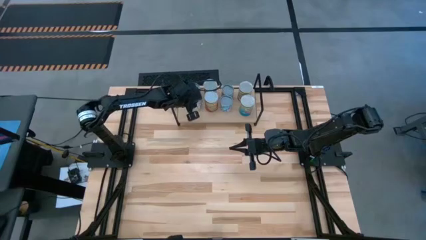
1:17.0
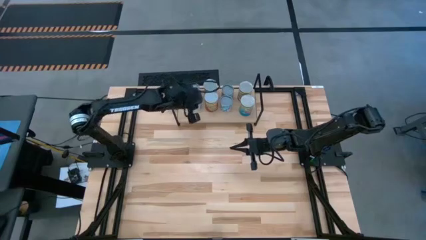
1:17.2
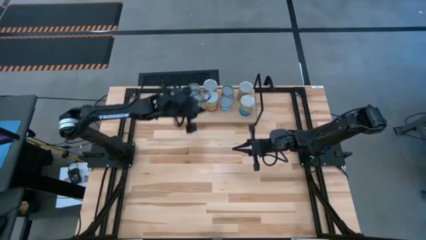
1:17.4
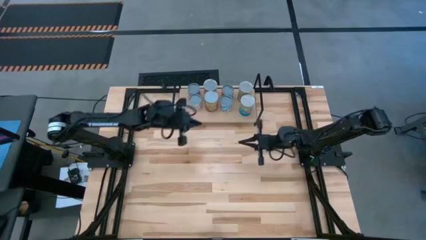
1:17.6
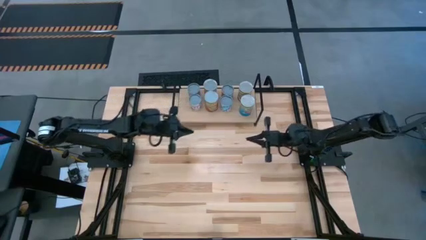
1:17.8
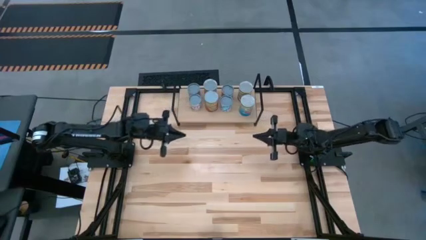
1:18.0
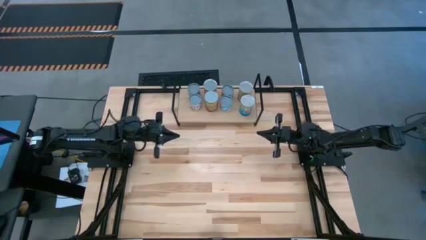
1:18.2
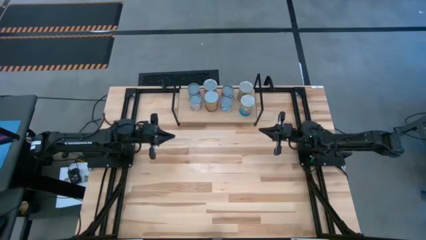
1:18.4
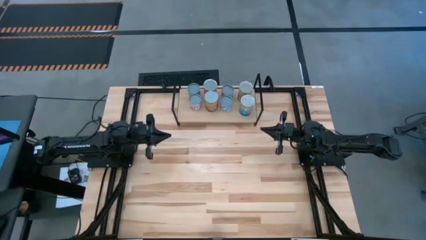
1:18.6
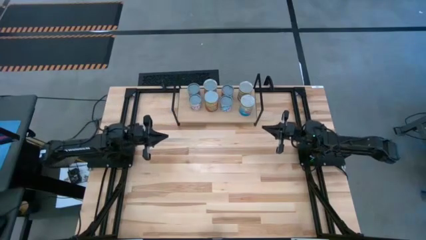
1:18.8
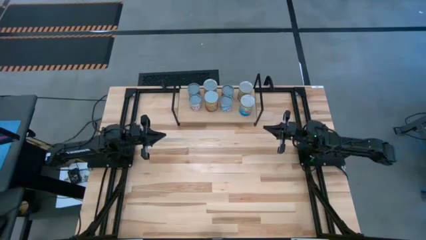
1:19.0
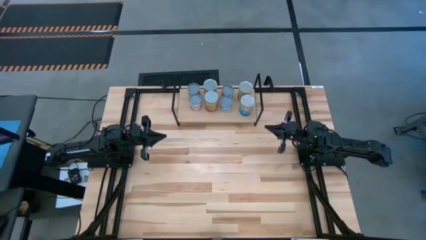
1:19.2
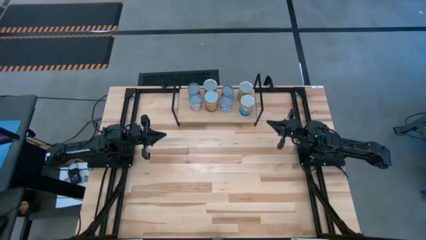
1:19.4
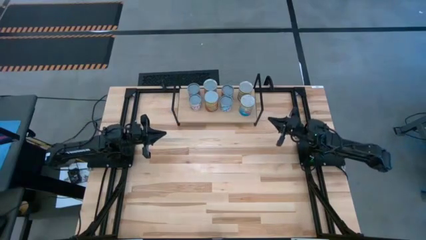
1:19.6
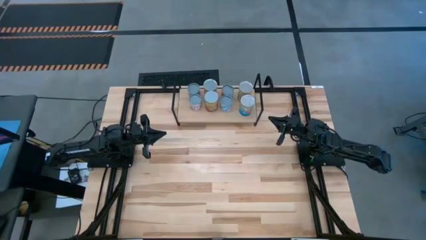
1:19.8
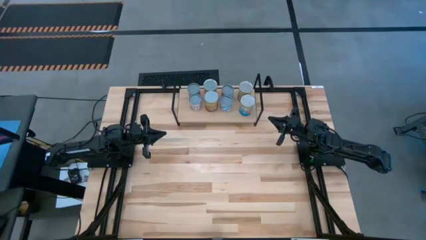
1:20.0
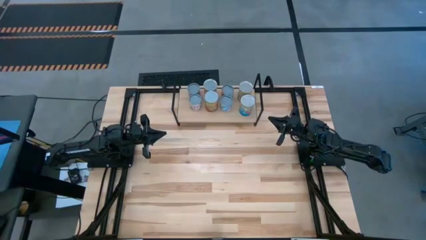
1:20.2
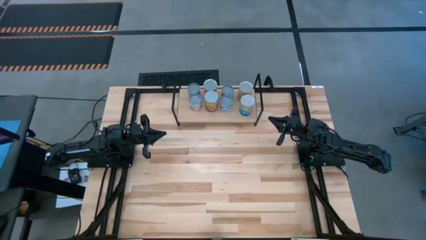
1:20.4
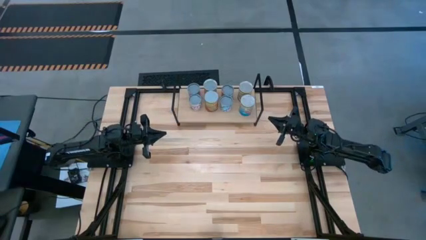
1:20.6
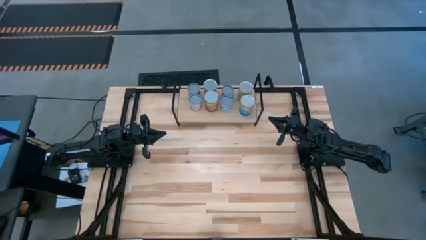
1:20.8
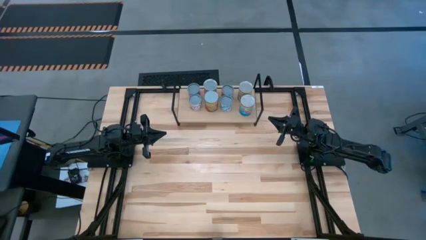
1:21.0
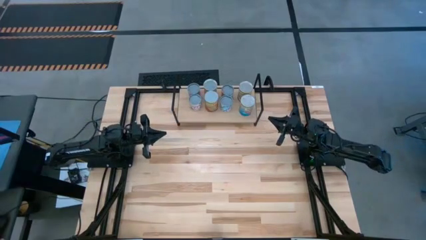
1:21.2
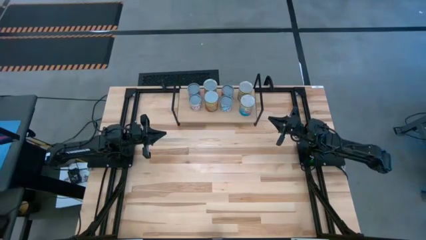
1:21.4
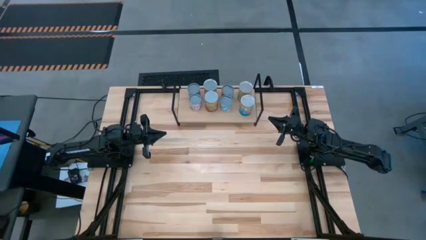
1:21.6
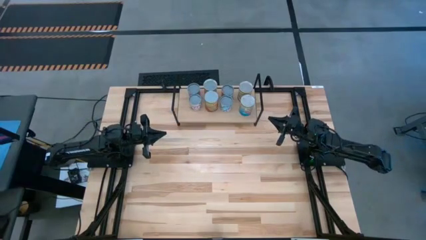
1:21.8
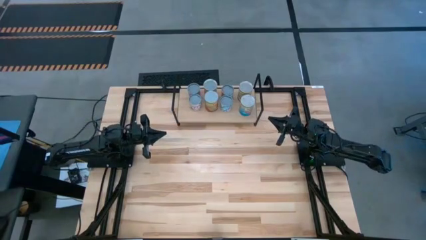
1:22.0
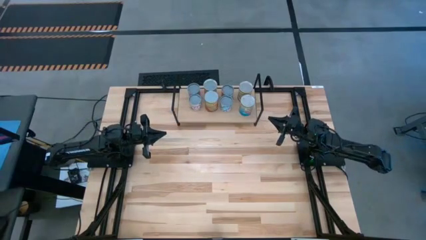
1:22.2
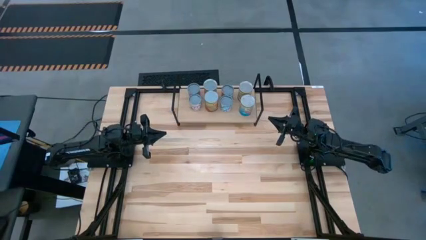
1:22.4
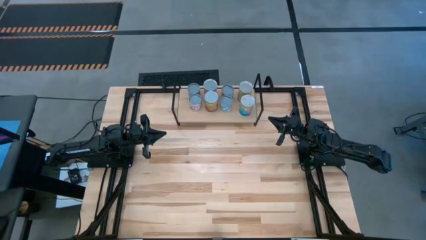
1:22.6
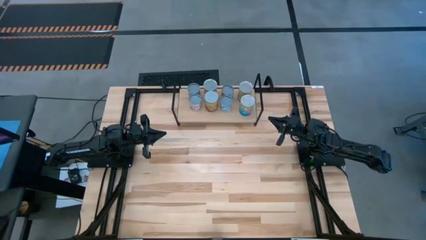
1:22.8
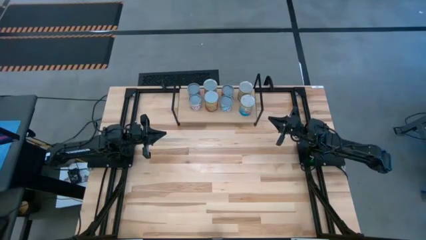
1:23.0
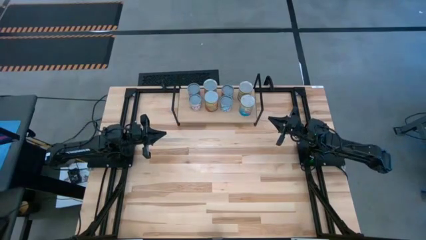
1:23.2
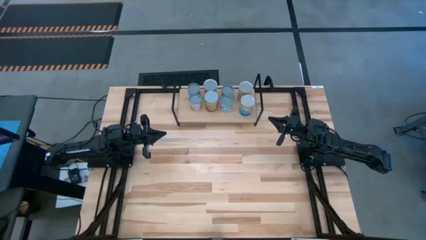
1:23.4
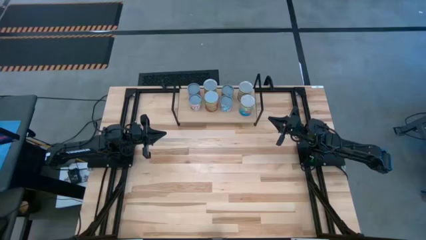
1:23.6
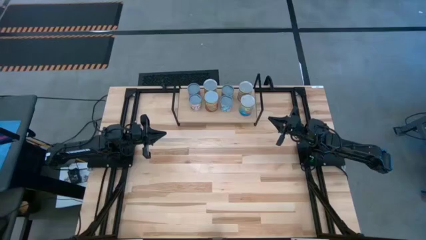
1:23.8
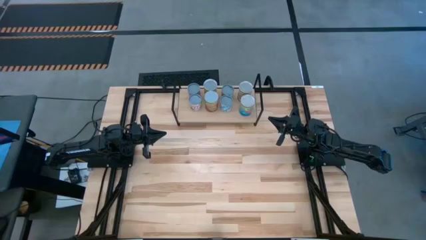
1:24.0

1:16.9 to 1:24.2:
Task: Pick and place cans onto a shelf
Return to Home Position

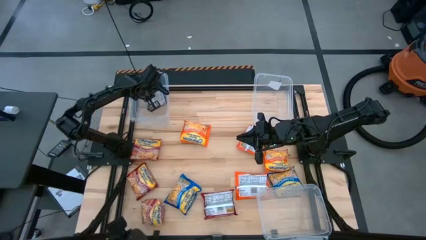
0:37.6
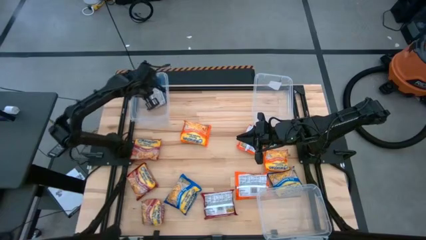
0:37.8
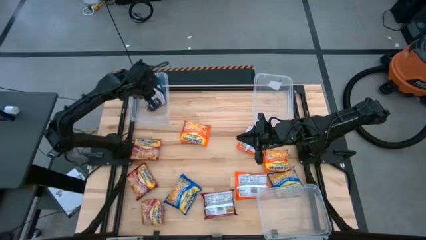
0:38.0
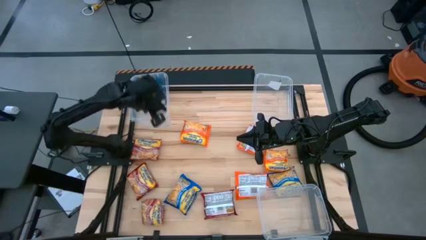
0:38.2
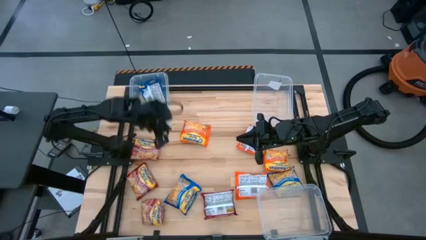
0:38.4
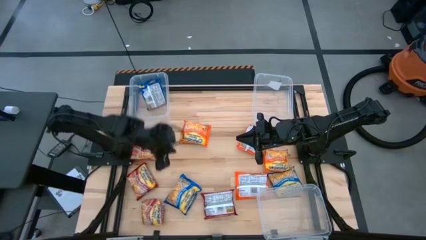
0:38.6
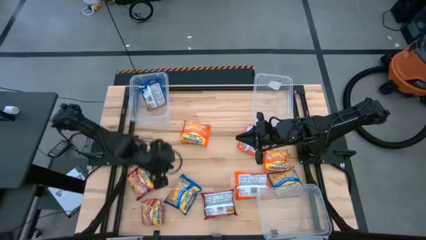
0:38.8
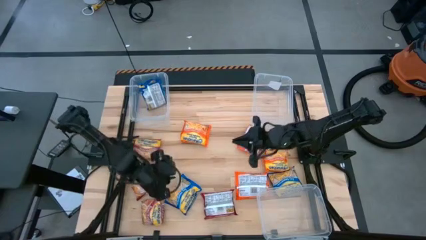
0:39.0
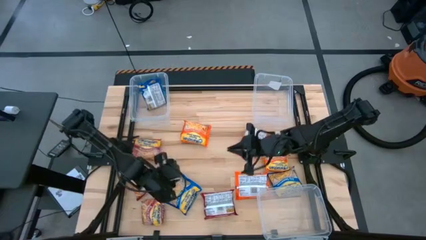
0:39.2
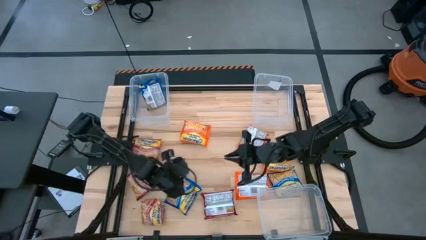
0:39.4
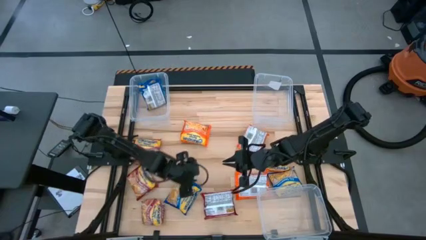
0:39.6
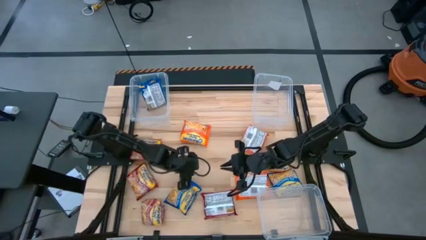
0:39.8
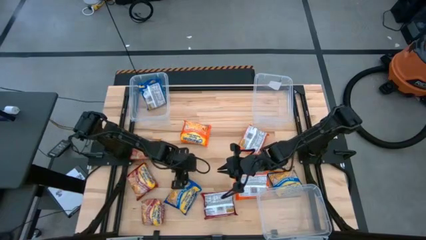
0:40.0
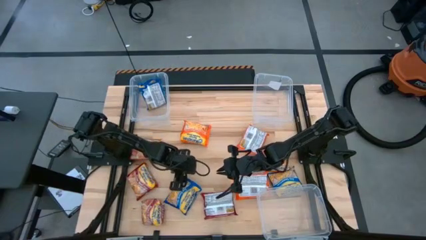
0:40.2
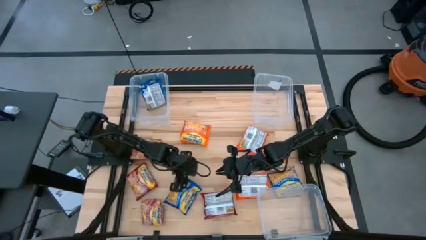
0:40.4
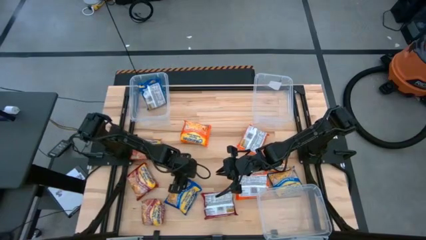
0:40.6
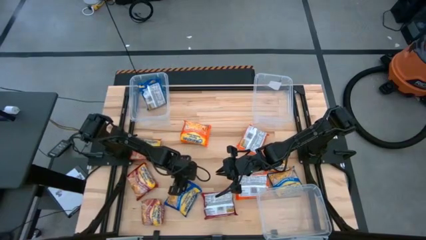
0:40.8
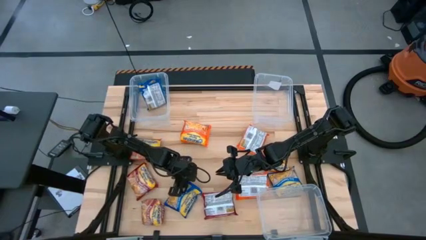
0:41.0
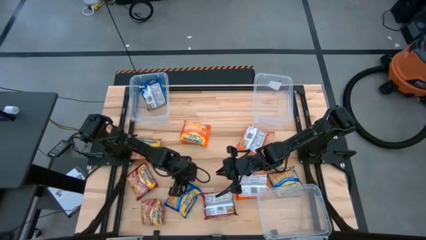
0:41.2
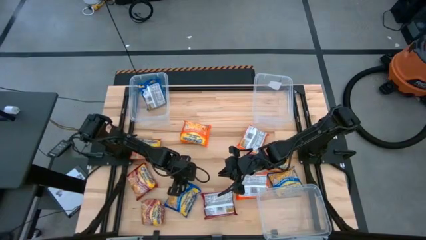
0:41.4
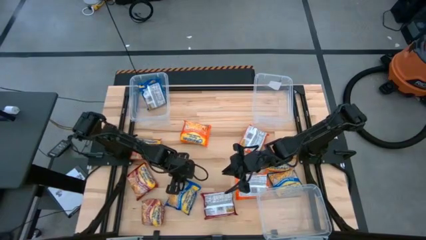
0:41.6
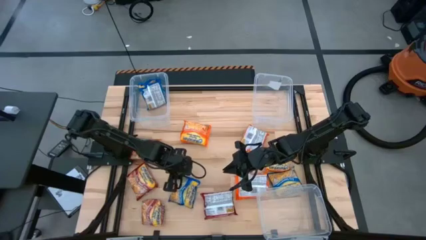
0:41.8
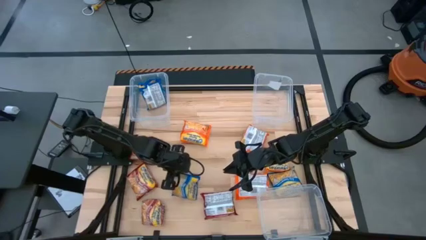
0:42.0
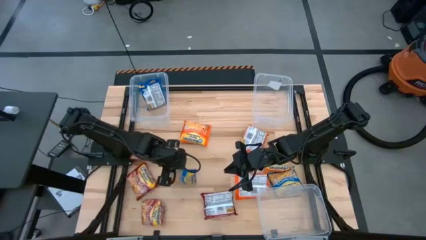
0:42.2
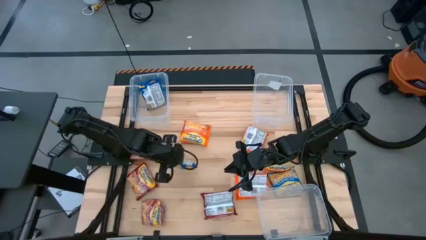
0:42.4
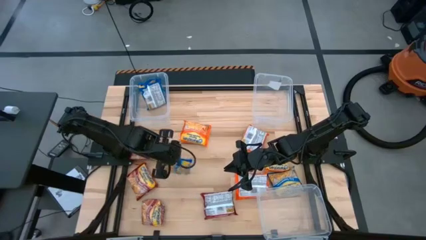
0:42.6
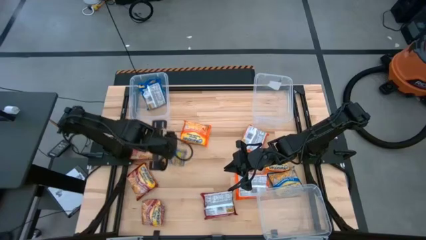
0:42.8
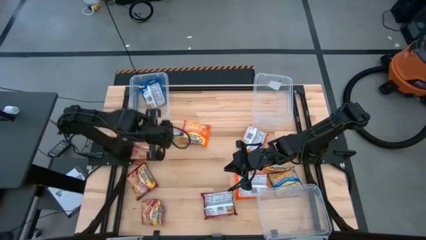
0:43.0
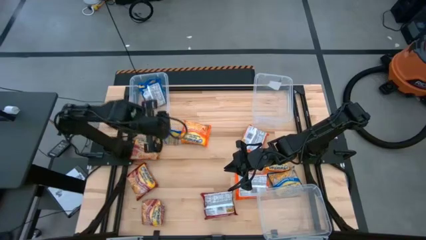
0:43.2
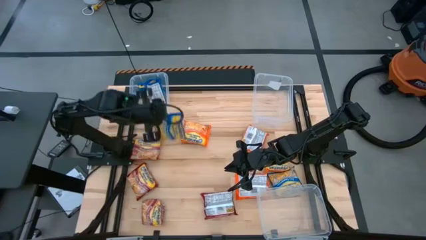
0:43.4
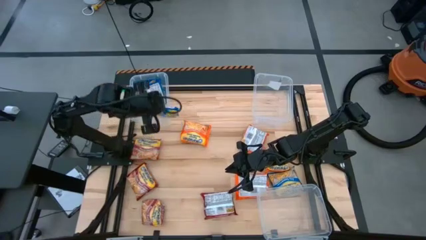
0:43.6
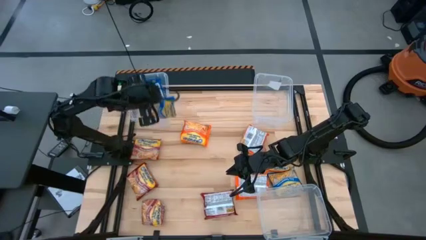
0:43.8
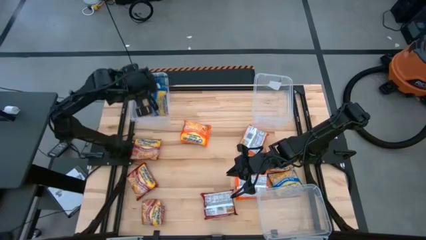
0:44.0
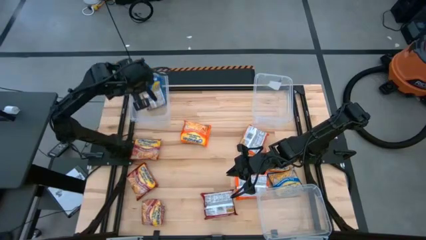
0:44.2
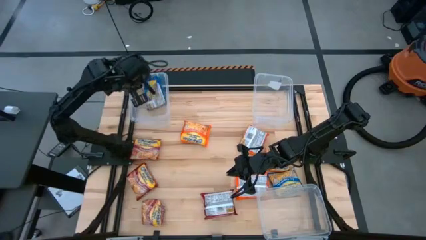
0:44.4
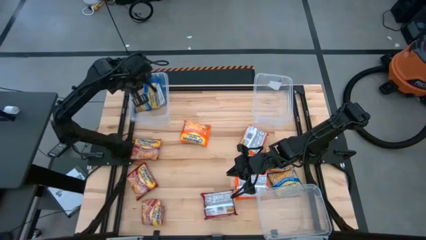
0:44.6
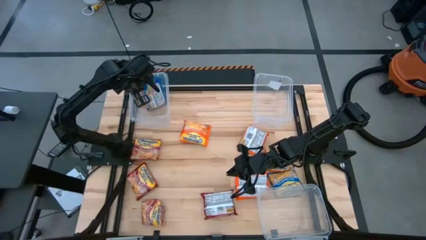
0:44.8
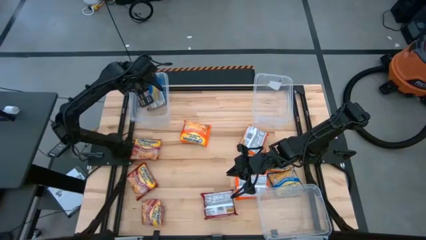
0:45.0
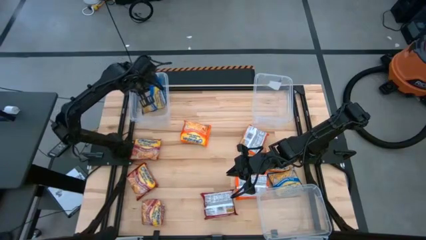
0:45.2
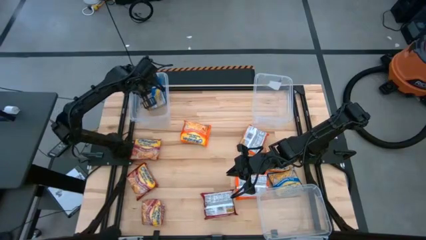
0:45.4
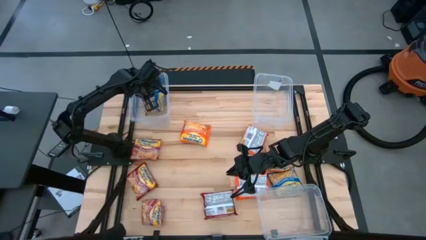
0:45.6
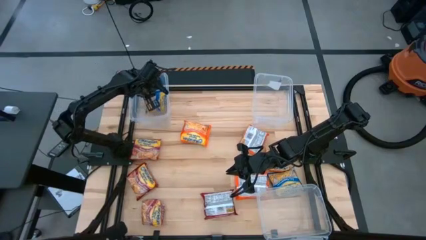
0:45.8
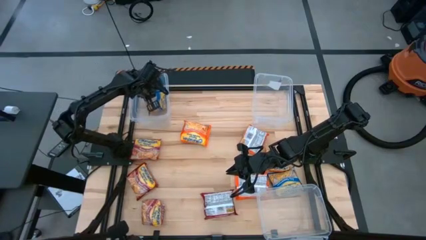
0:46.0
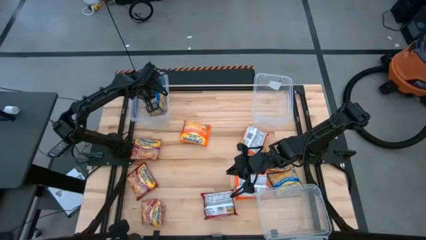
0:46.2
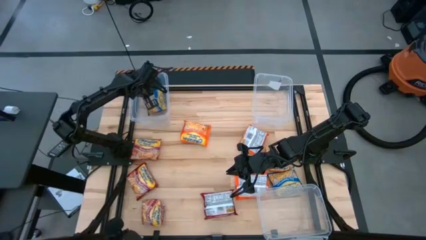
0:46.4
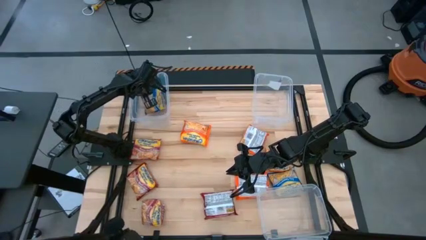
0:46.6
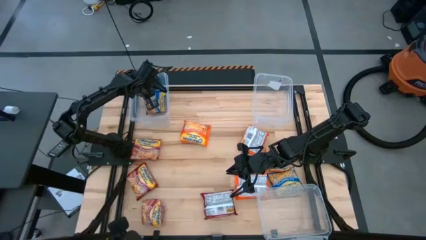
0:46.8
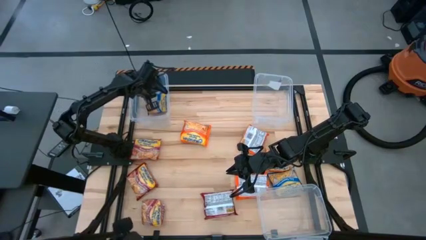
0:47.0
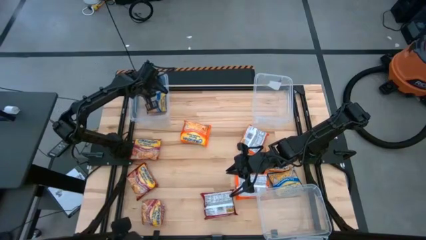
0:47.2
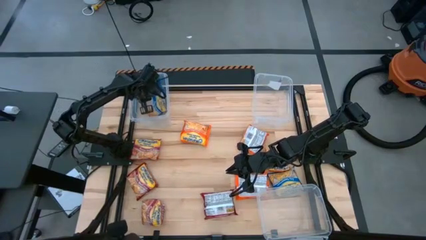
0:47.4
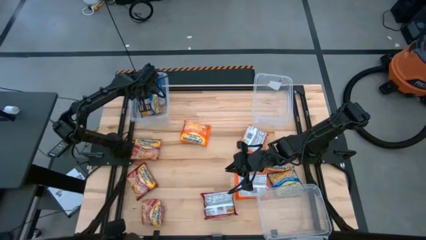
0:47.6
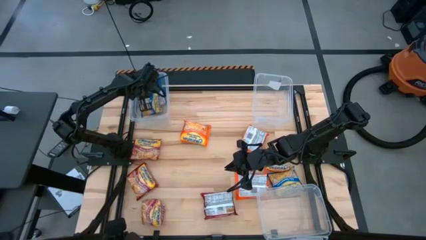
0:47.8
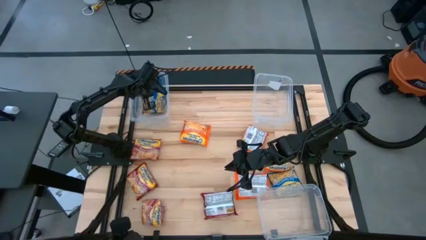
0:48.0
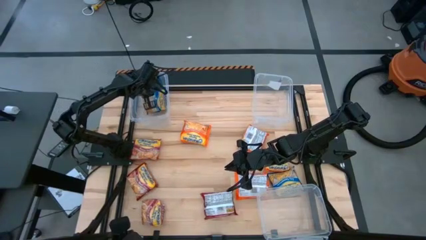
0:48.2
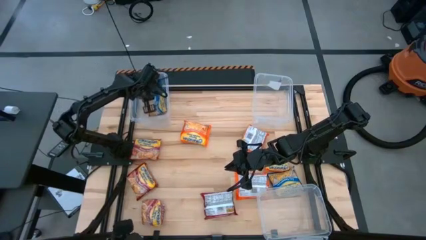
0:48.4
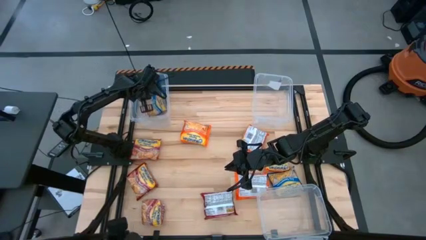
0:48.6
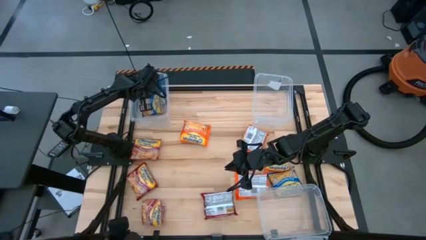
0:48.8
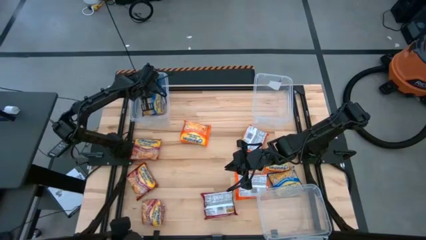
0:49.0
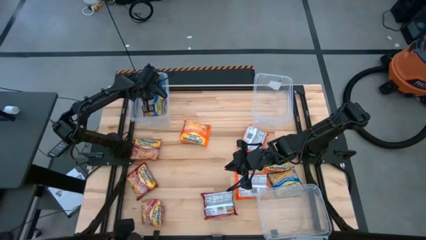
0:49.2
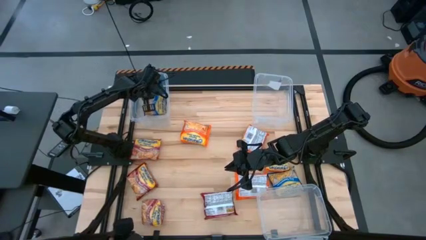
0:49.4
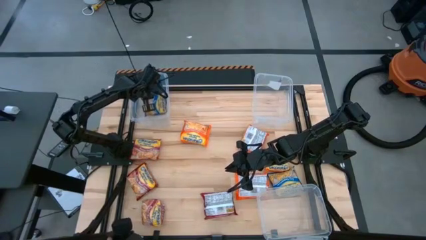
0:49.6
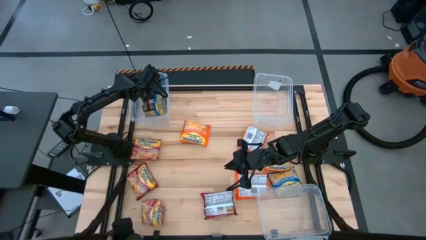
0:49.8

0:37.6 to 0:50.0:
Task: Sort Maruchan noodles
Put the blue noodle pack into the top left transparent bin
